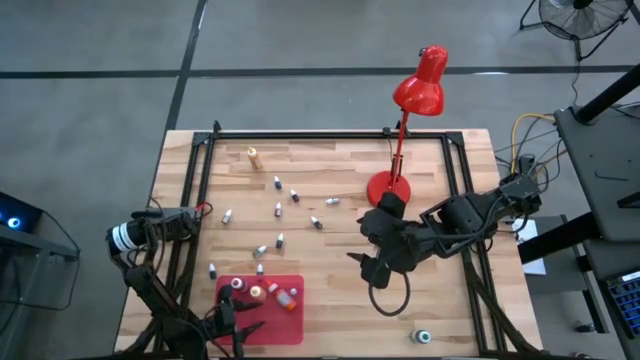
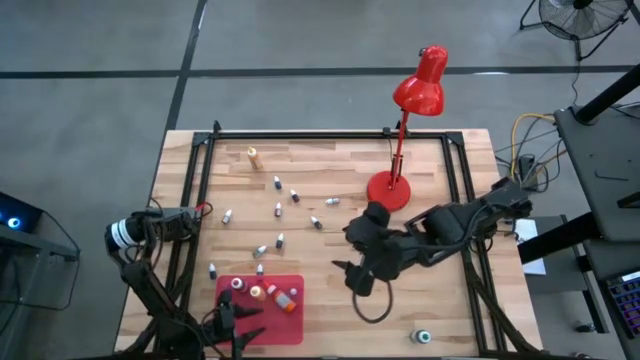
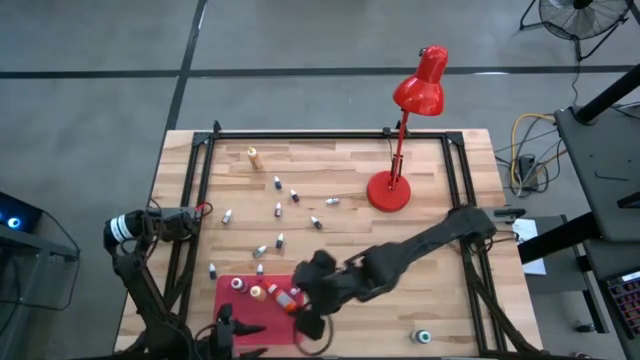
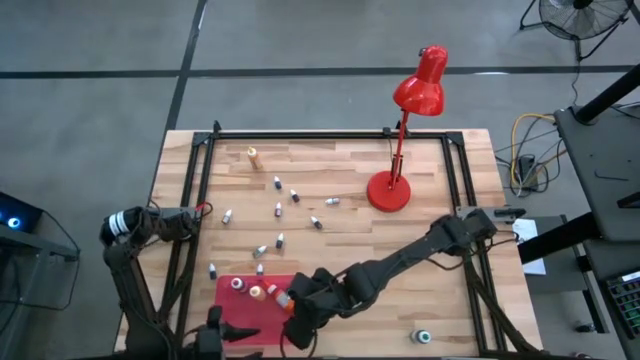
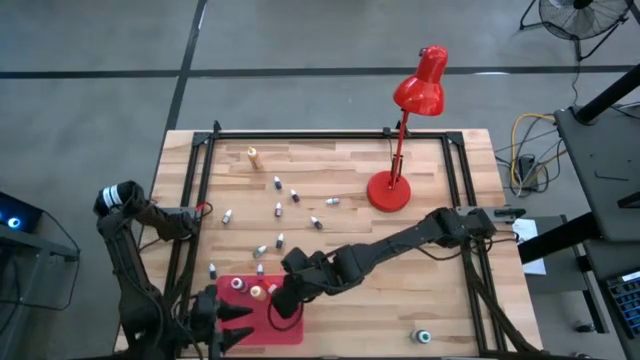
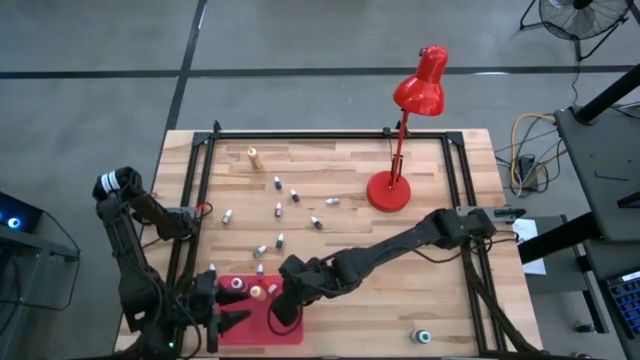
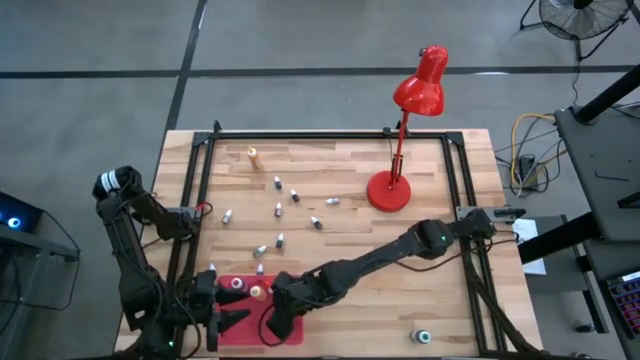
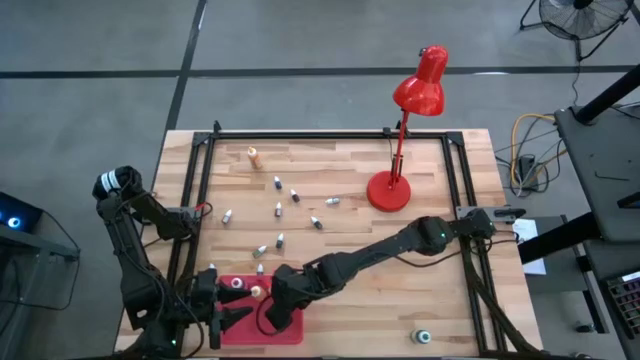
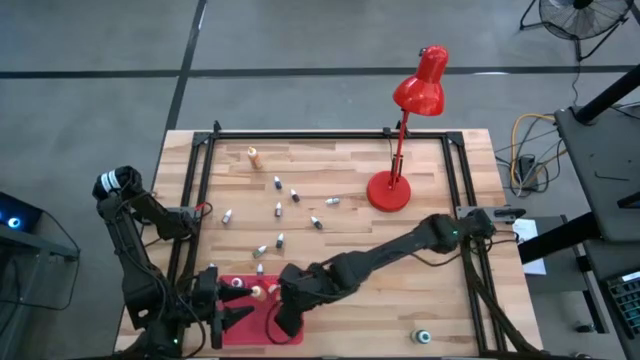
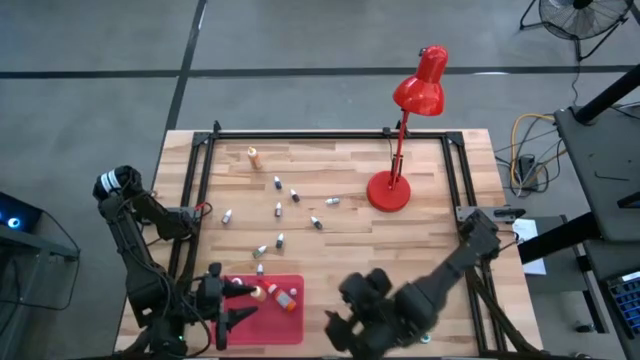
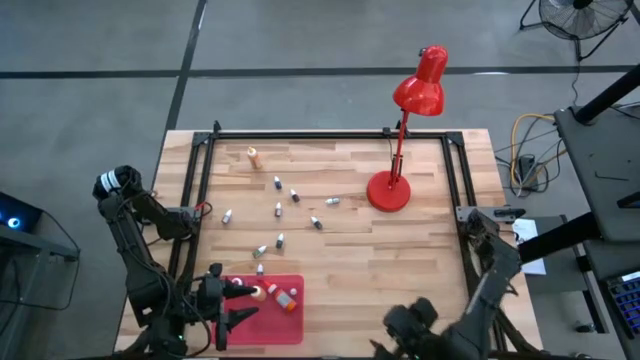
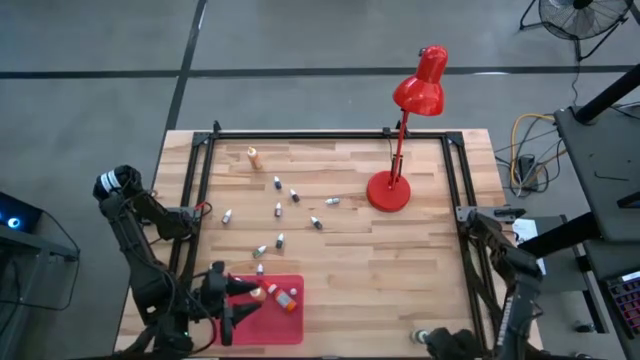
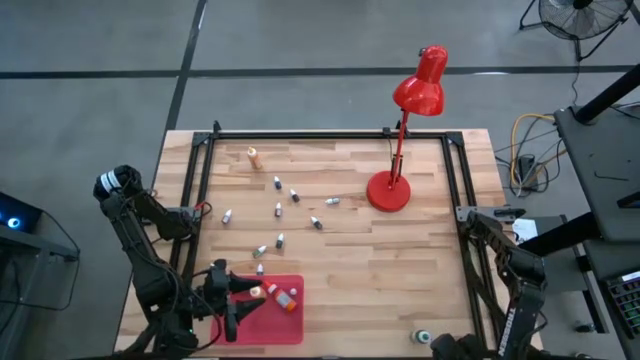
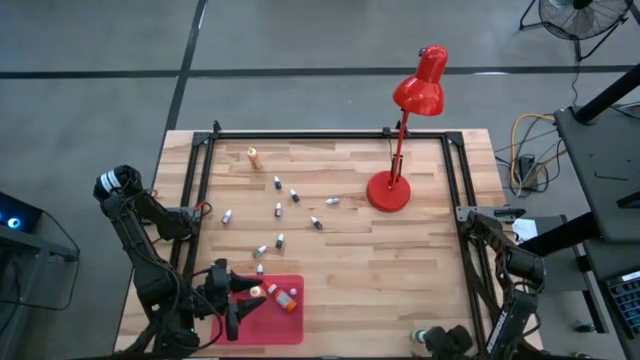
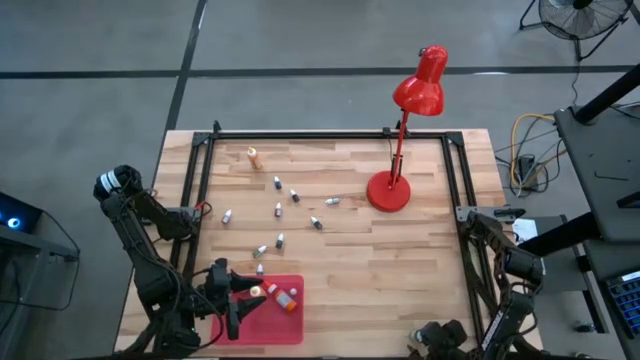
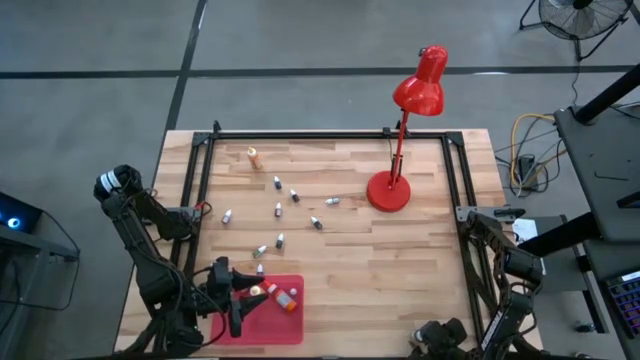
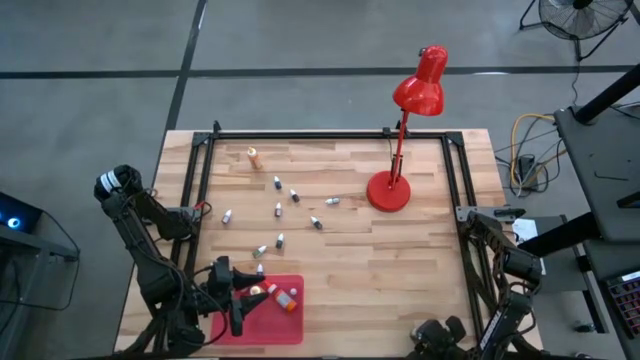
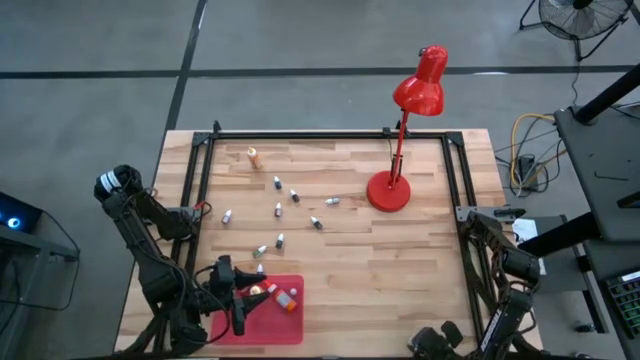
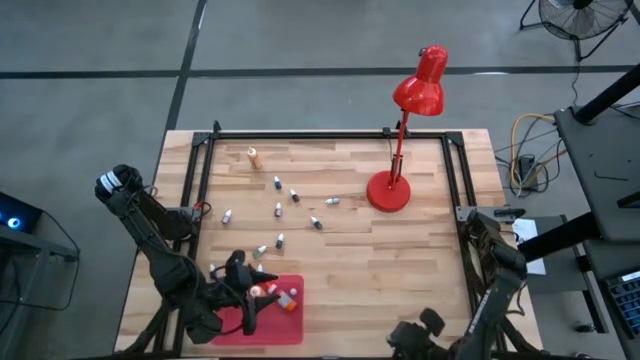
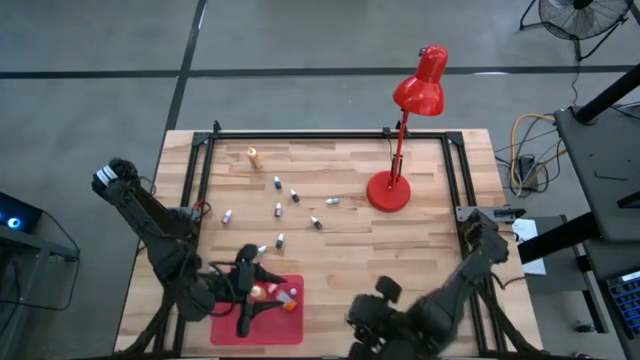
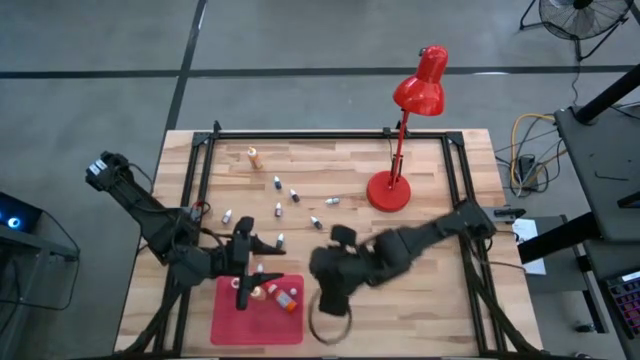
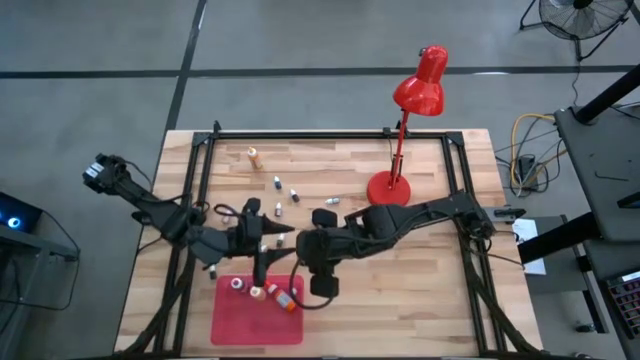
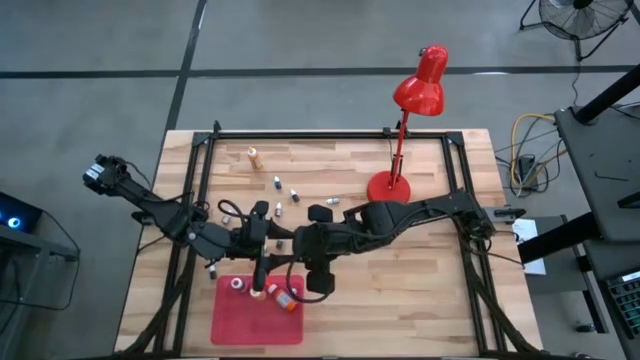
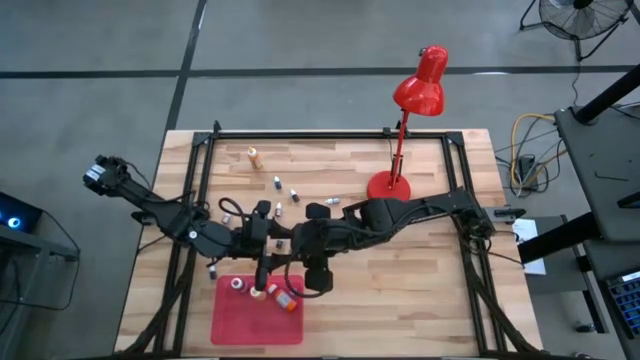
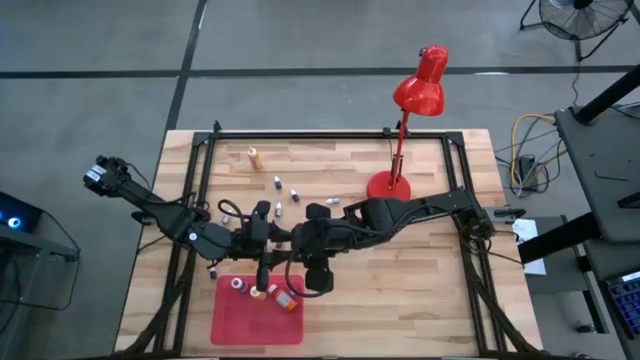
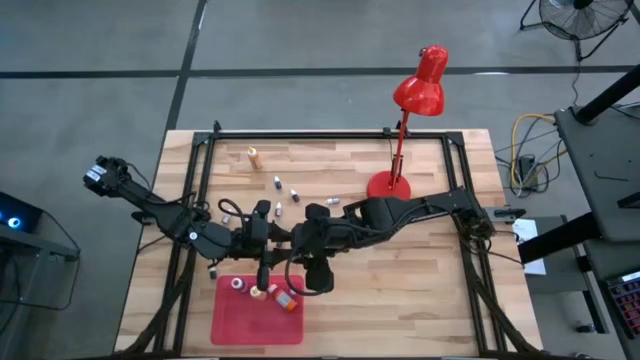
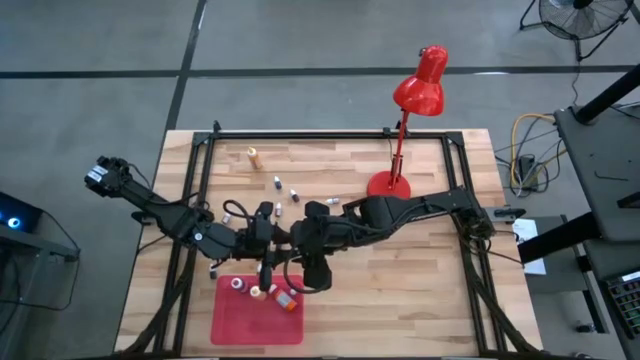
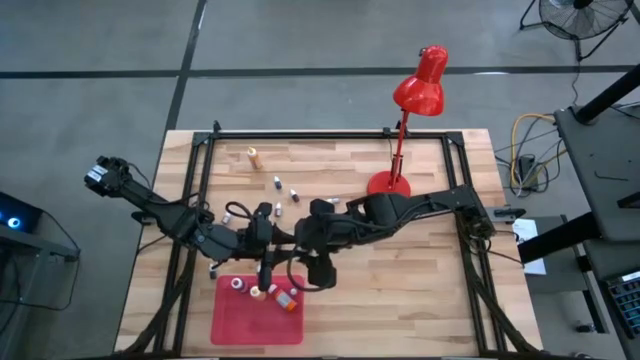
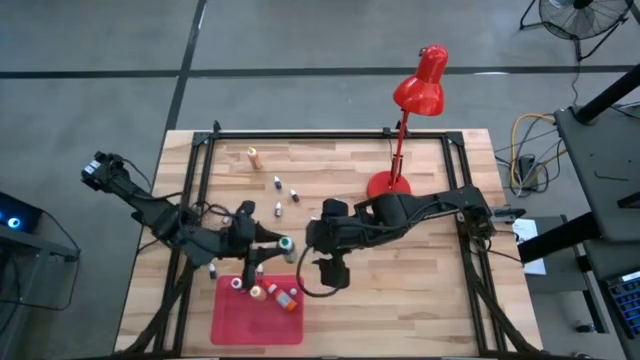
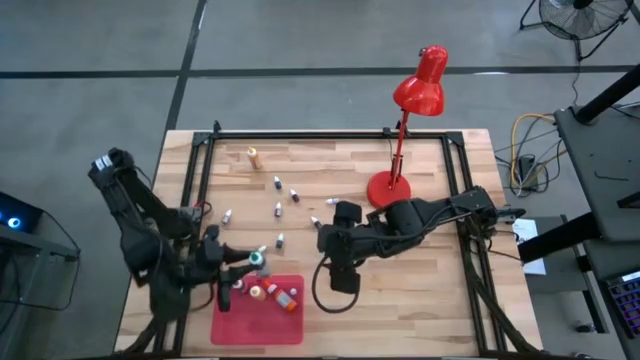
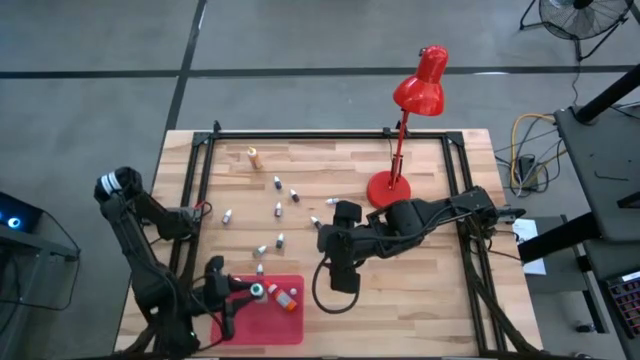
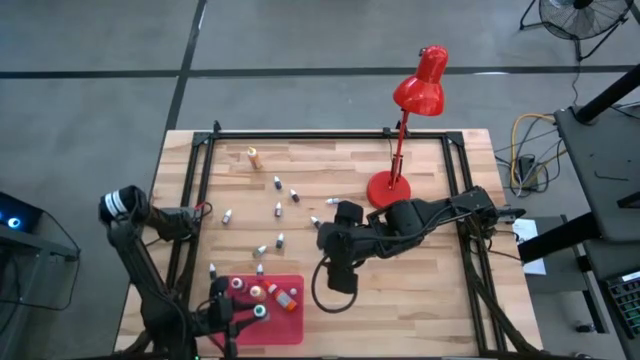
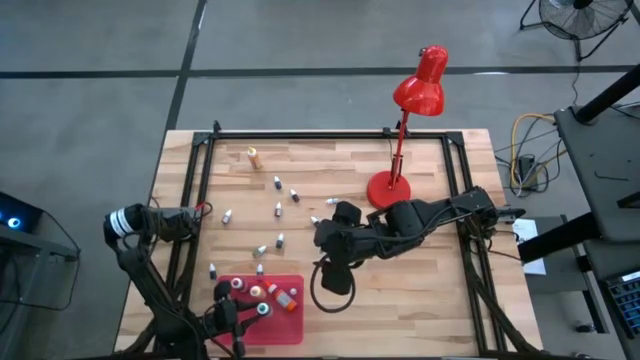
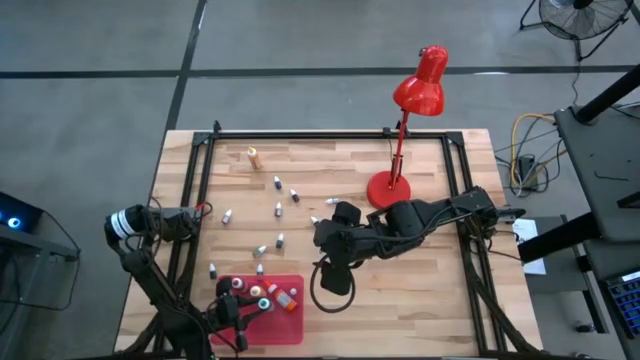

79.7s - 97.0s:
Task: Pick & Place food coloring
Put the large green food coloring bottle into the red bin

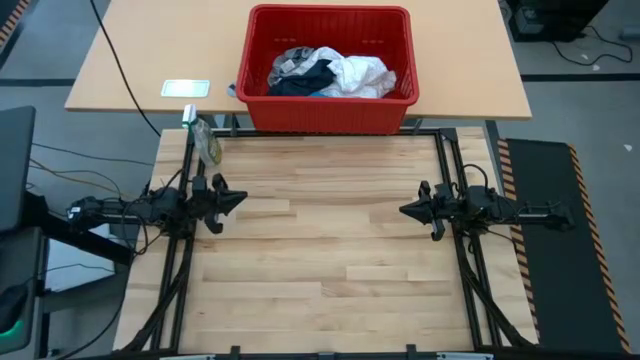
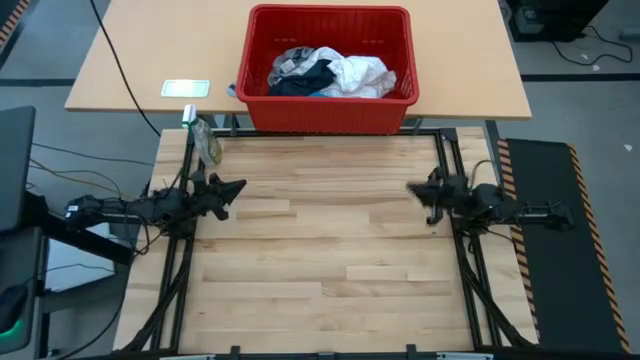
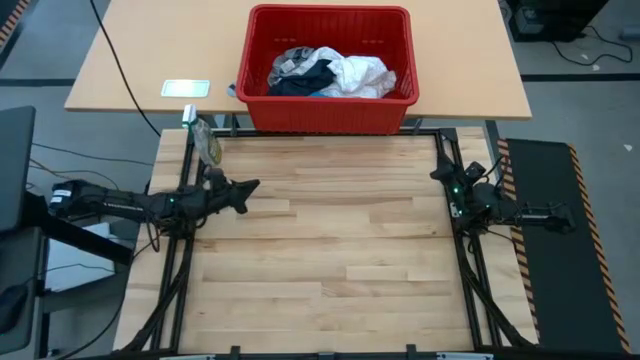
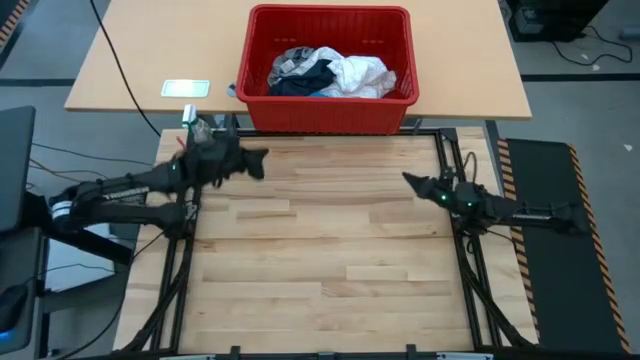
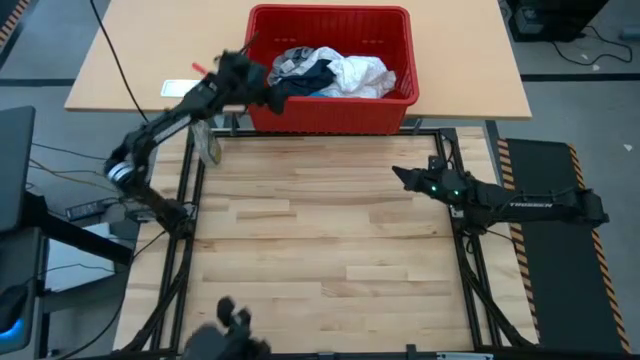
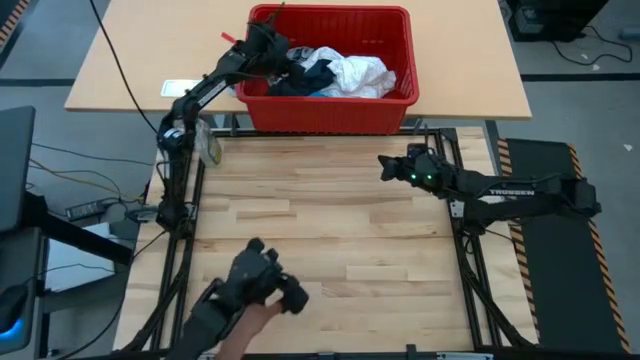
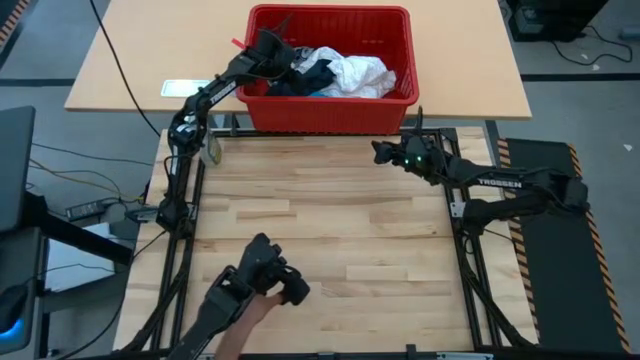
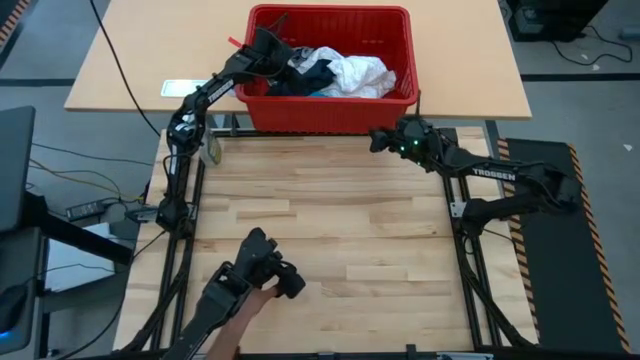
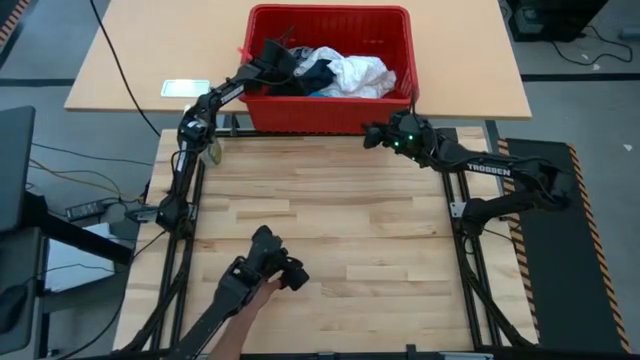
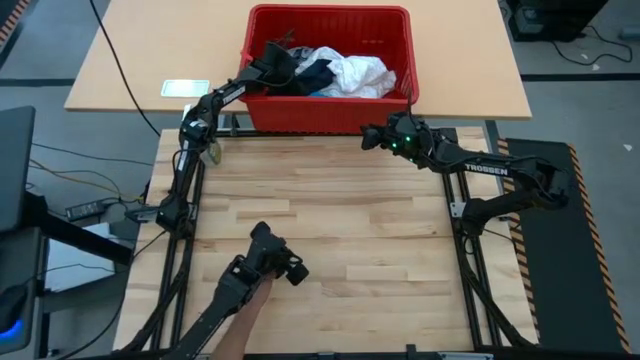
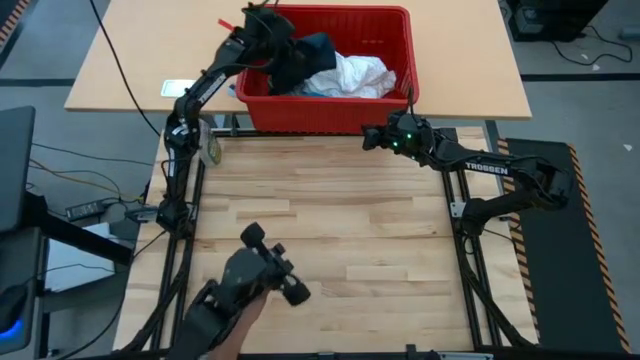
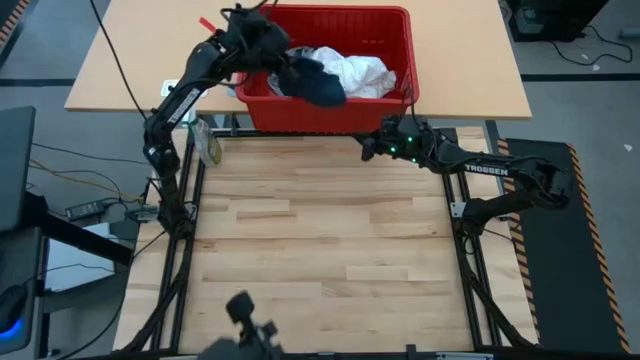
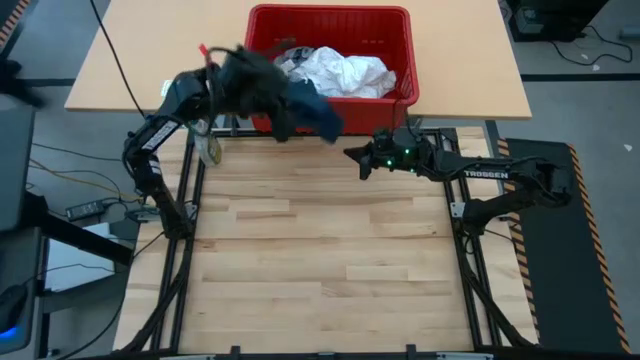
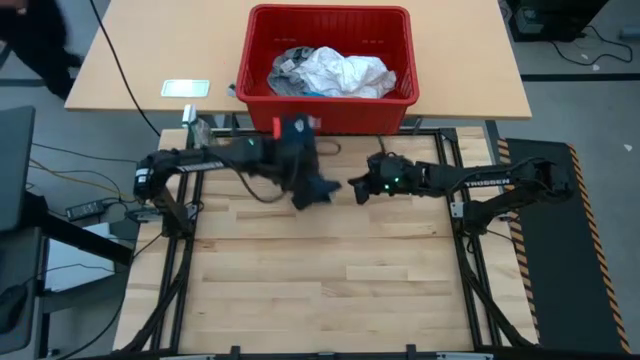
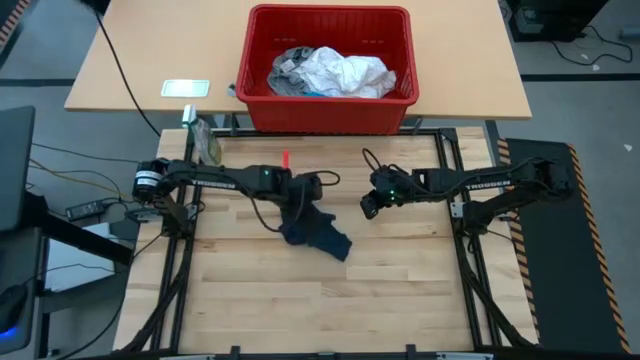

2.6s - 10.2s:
Task: Fold laundry
Remove the blue shorts from the red laundry bin
